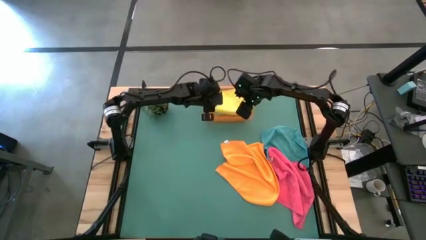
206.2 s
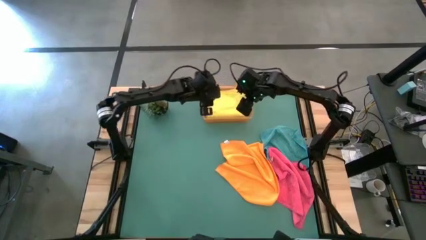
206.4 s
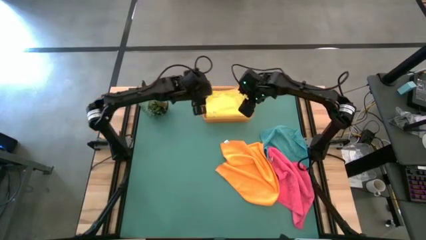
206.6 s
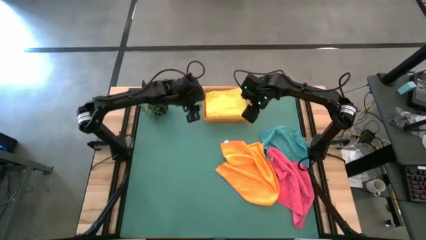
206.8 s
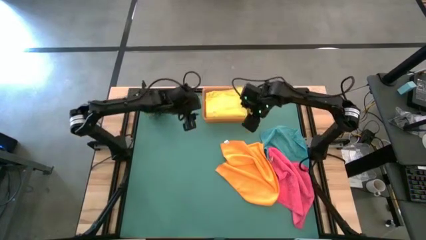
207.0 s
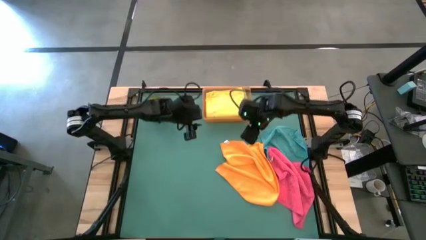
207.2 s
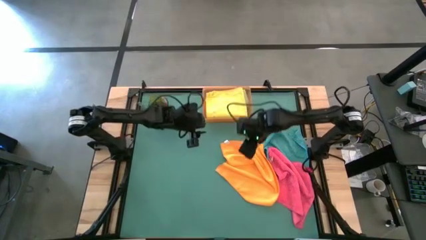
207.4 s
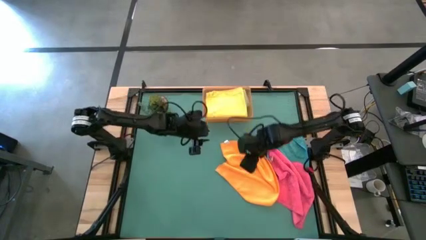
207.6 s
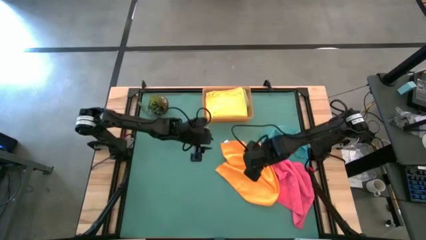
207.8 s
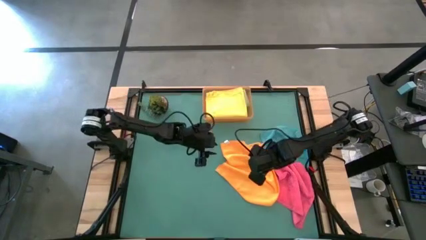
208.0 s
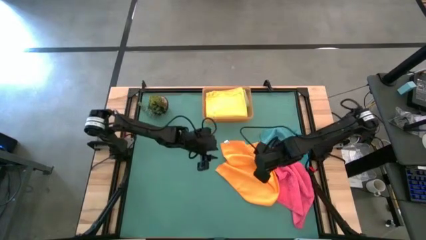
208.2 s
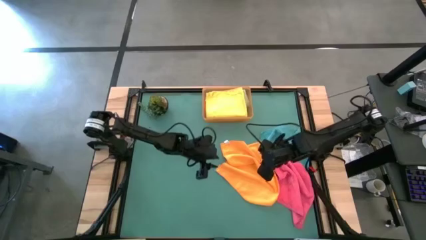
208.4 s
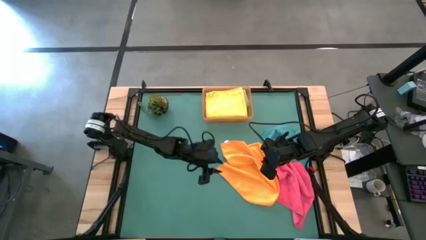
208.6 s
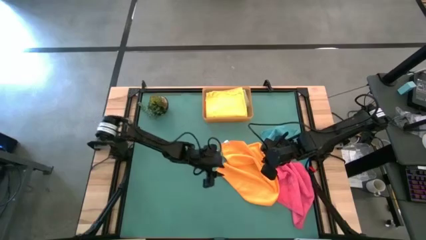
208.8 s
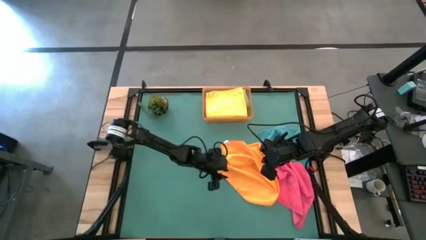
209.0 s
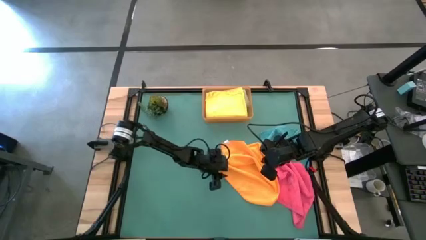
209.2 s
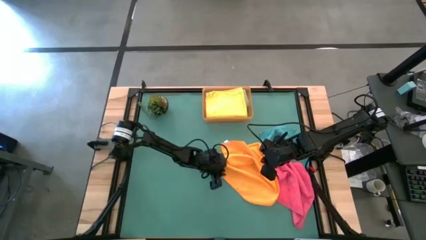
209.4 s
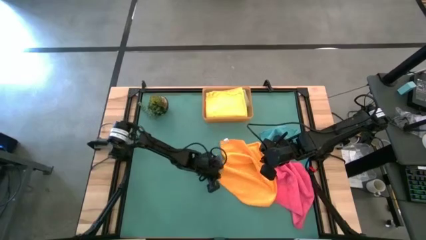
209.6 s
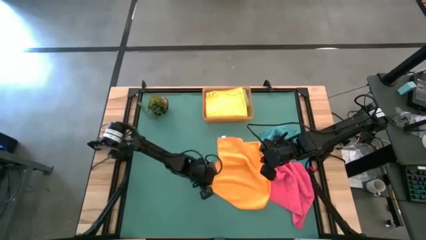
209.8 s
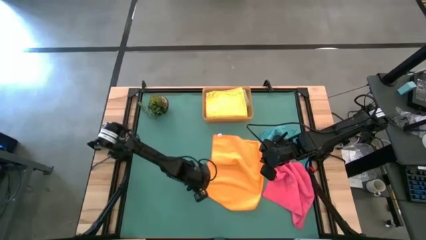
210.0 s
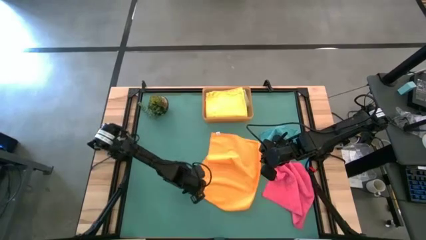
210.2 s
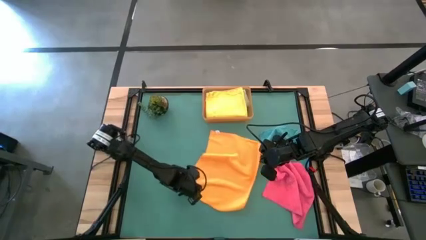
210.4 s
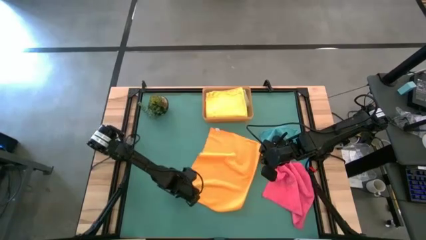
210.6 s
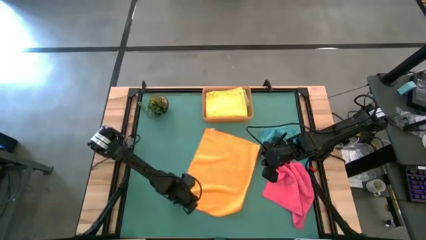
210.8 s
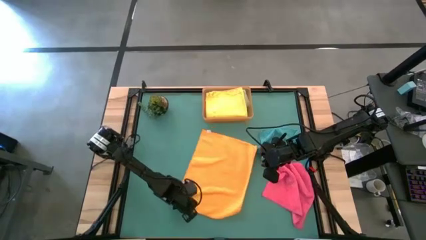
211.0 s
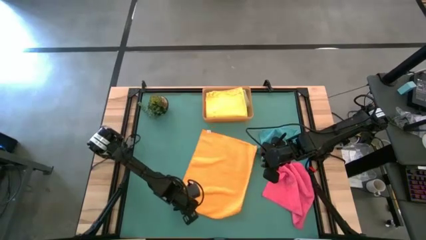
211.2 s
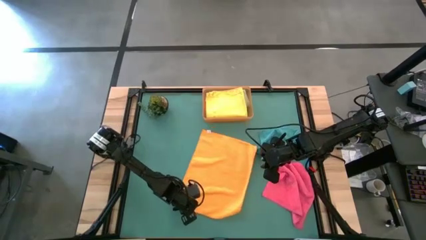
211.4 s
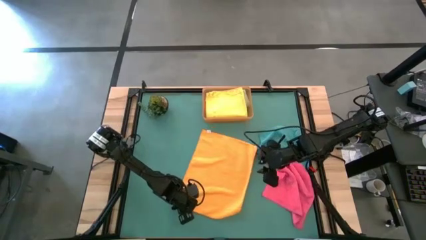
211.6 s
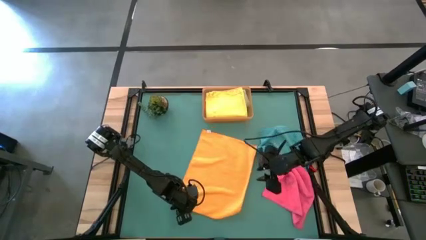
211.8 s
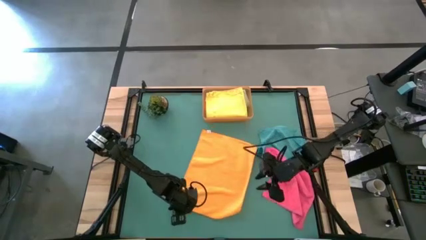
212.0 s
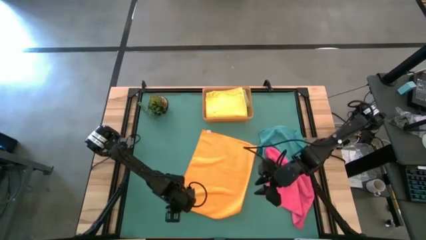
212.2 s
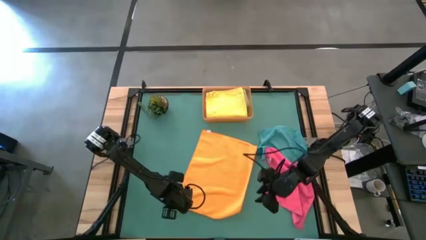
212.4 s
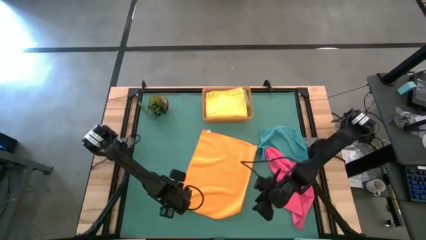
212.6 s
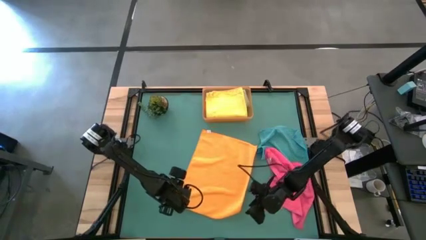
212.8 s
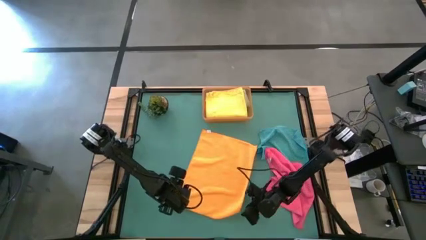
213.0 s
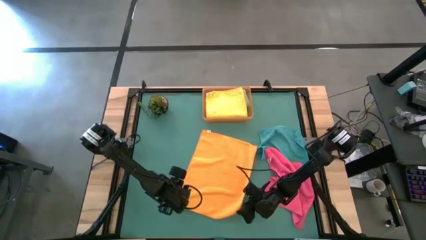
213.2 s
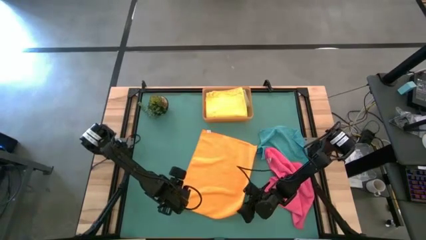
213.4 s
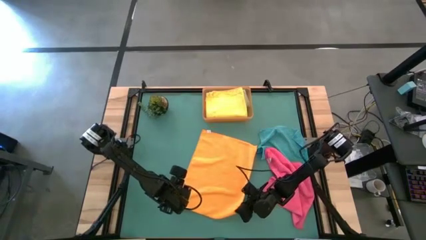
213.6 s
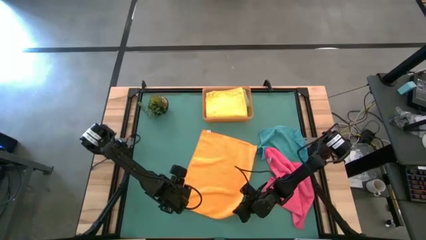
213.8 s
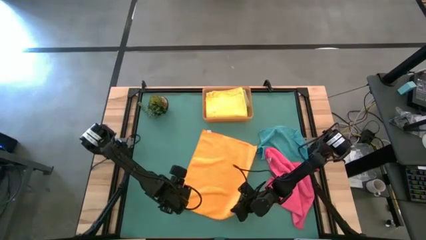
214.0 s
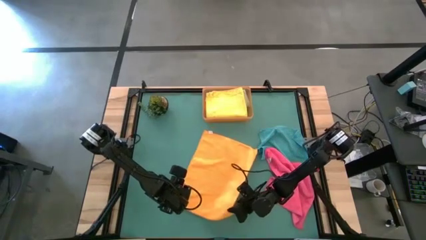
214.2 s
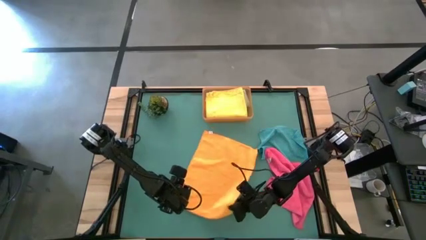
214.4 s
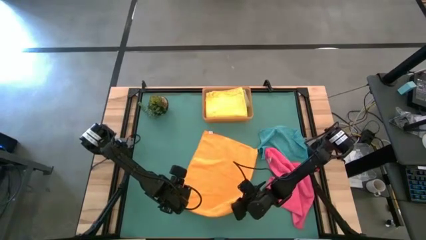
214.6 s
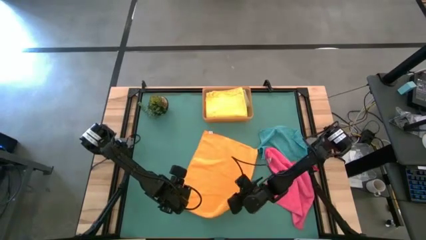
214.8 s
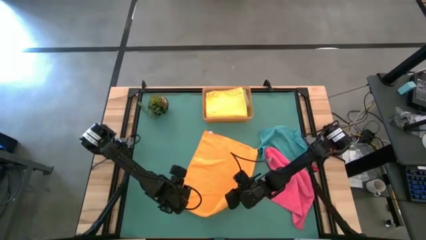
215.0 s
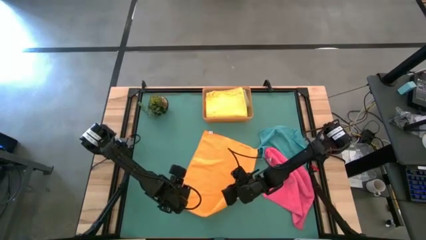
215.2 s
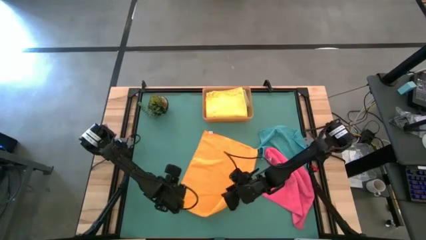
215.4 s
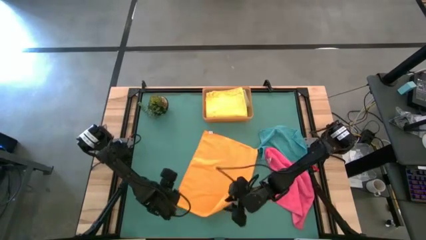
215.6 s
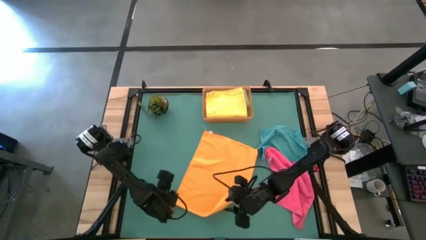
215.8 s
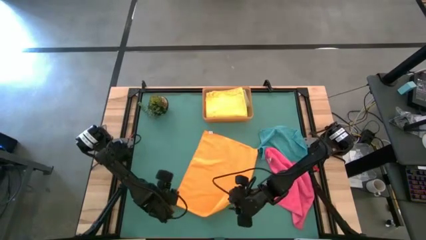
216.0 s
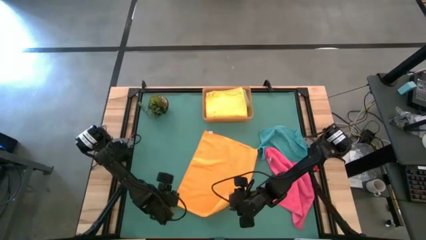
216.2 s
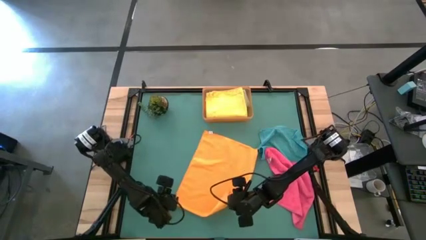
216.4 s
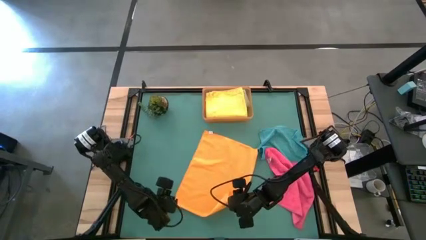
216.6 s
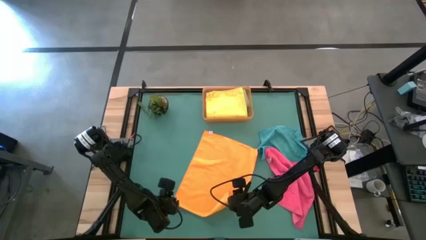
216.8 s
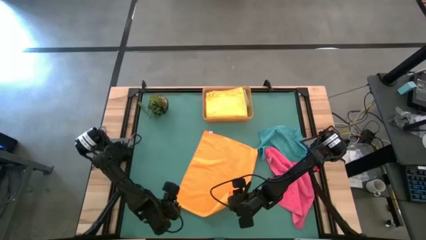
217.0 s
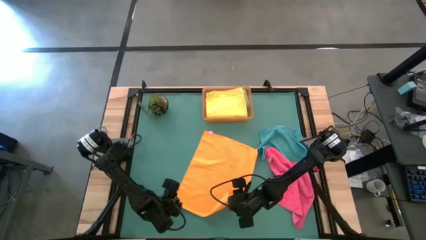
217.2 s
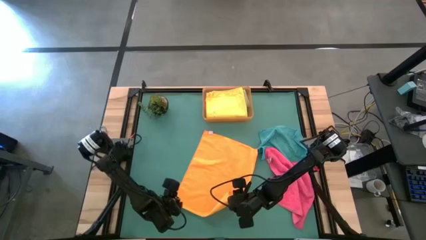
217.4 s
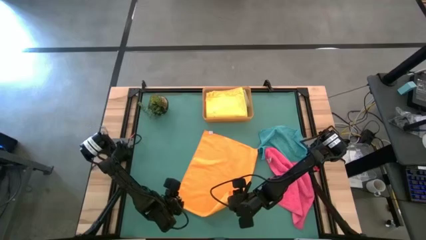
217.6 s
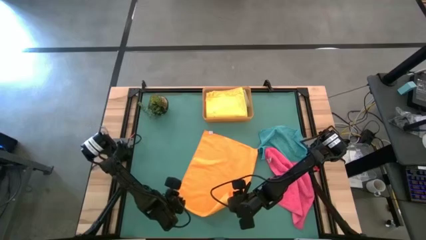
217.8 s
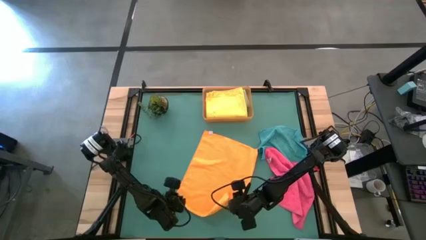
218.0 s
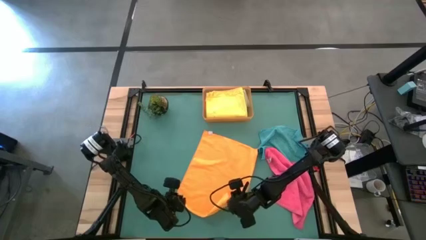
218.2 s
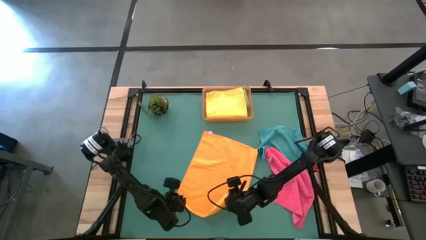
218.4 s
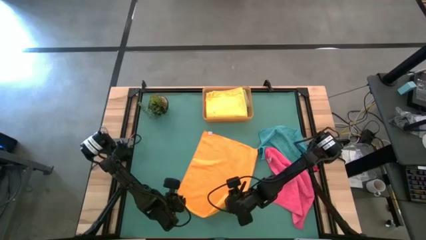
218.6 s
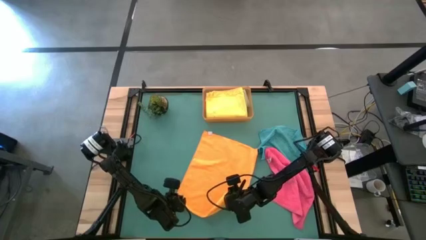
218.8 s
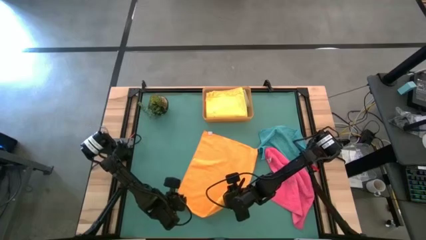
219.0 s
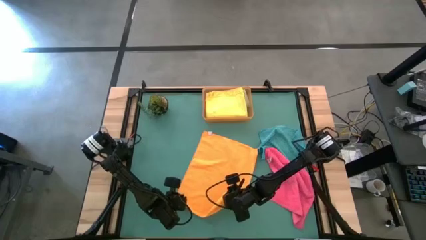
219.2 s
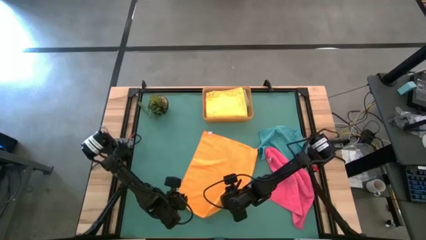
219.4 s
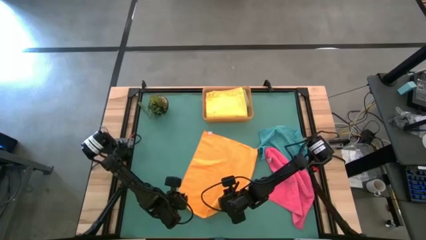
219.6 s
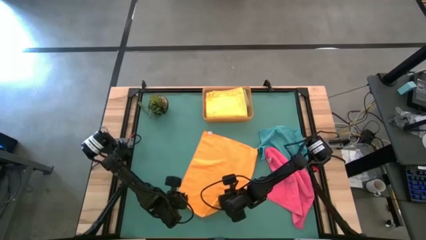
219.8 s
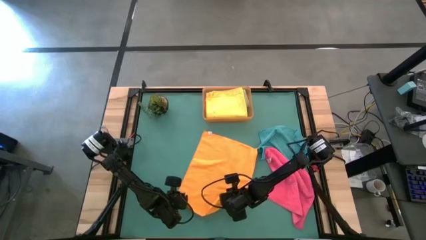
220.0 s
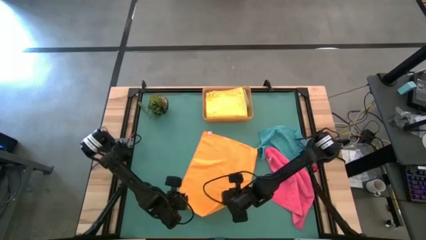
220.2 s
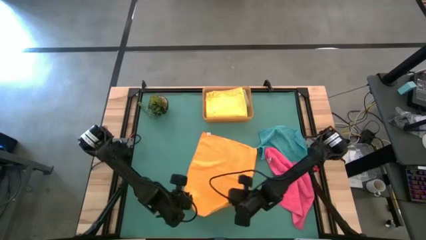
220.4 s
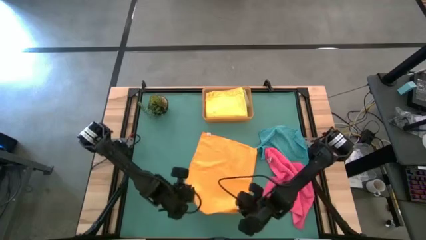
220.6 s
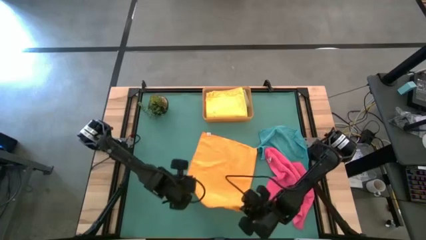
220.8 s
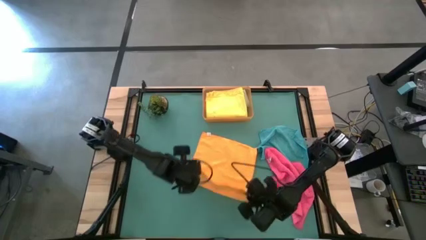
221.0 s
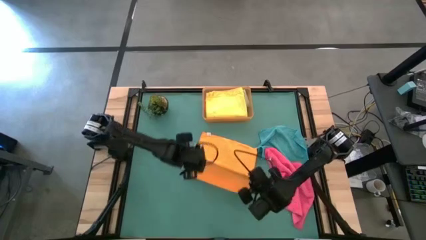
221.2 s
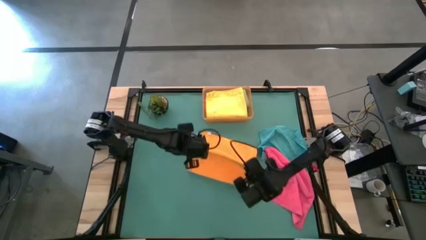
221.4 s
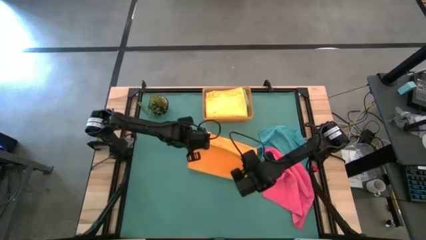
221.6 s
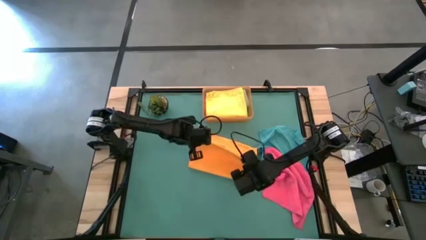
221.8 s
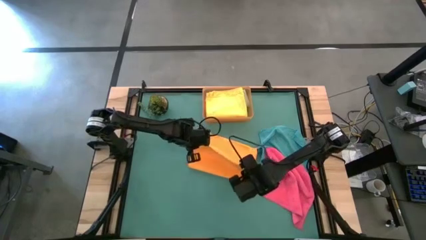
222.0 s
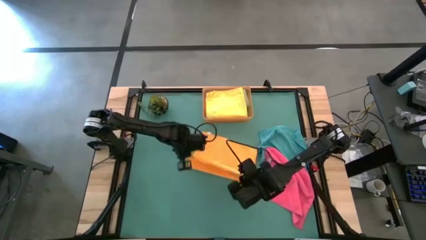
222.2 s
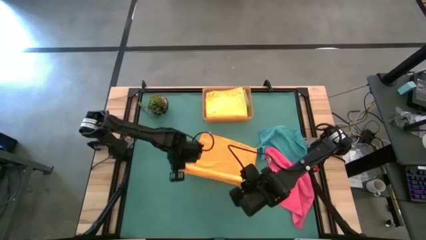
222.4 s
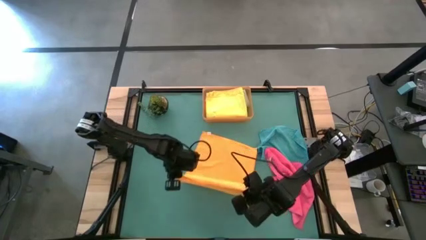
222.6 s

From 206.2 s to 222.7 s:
Task: Fold microfiber towels
Fold the orange towel
